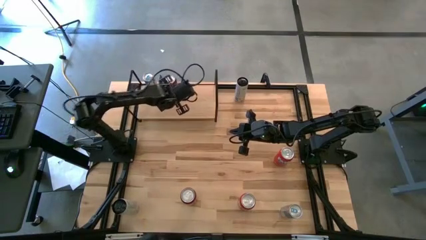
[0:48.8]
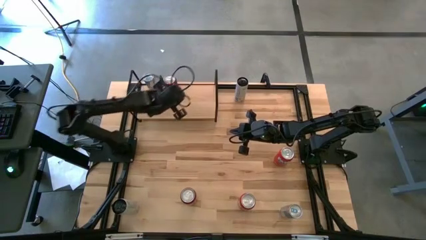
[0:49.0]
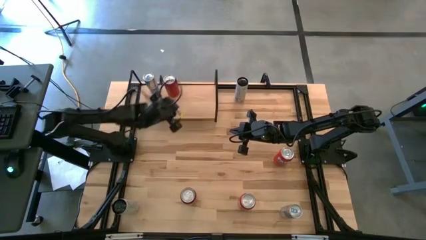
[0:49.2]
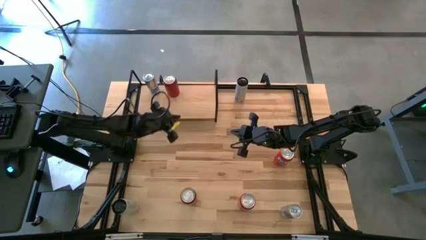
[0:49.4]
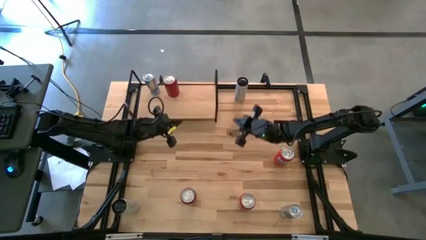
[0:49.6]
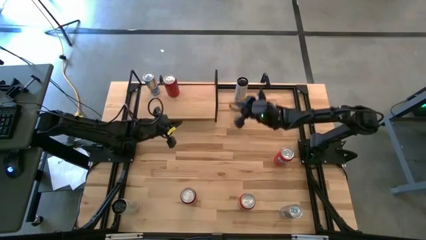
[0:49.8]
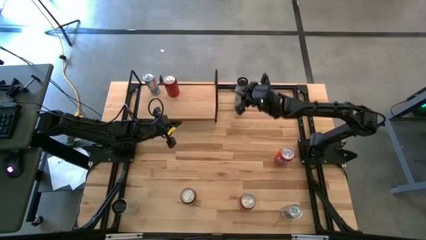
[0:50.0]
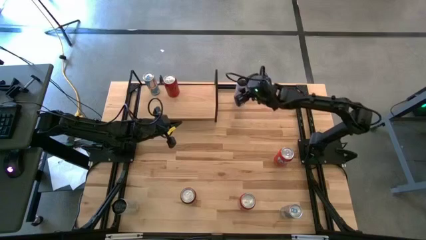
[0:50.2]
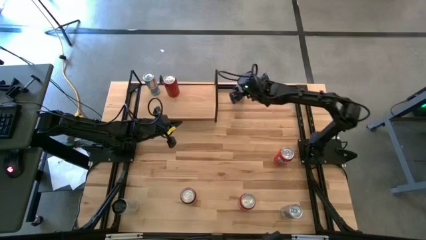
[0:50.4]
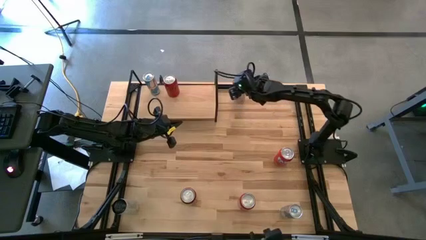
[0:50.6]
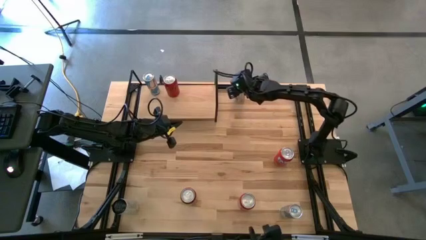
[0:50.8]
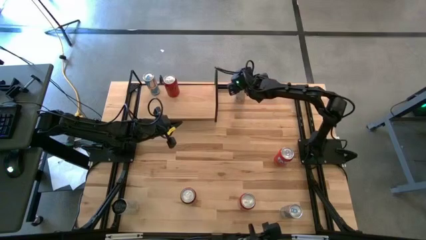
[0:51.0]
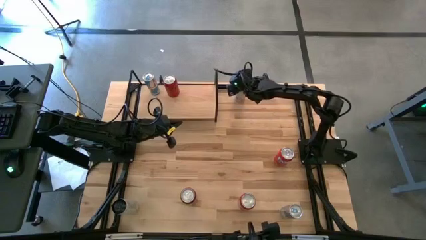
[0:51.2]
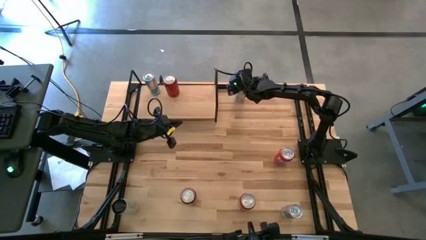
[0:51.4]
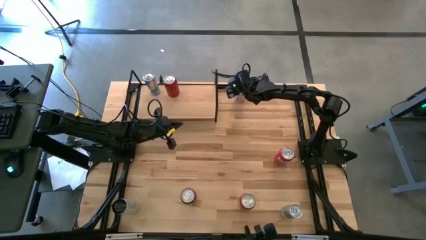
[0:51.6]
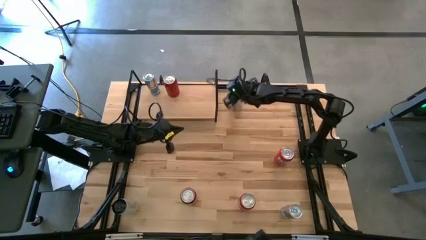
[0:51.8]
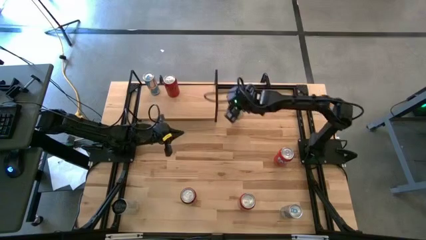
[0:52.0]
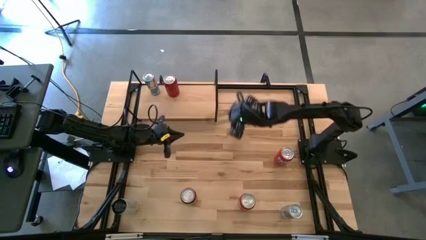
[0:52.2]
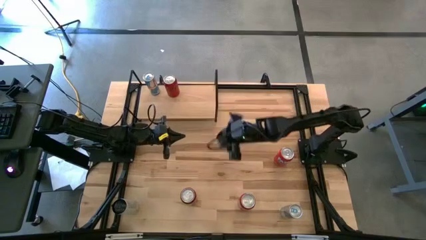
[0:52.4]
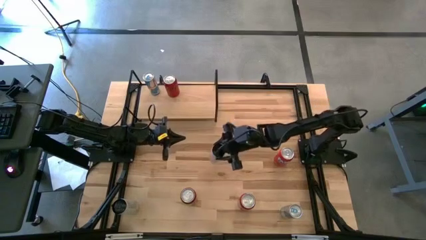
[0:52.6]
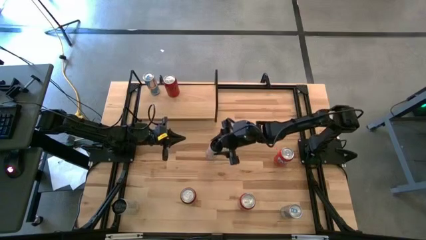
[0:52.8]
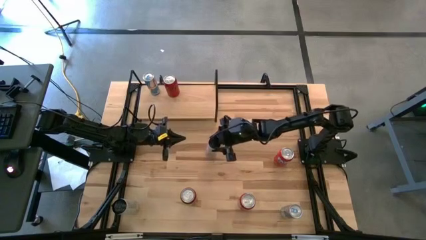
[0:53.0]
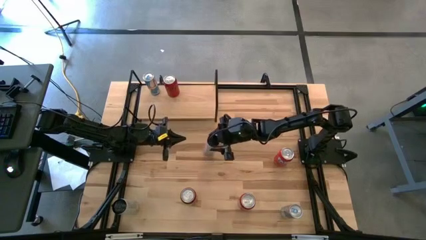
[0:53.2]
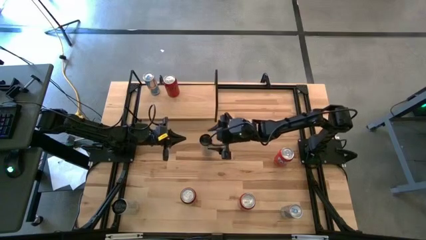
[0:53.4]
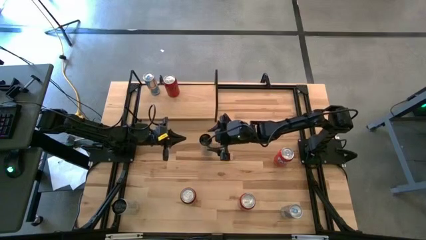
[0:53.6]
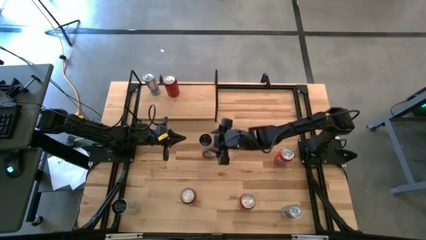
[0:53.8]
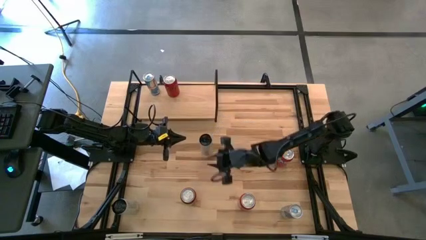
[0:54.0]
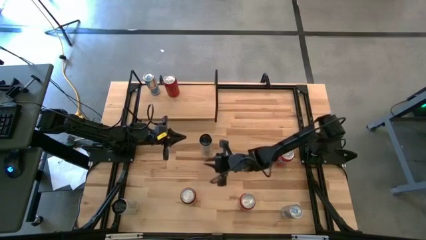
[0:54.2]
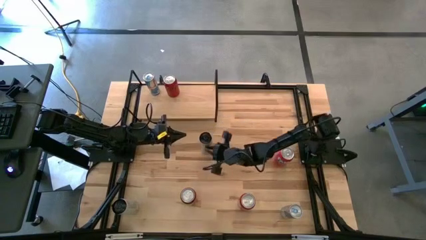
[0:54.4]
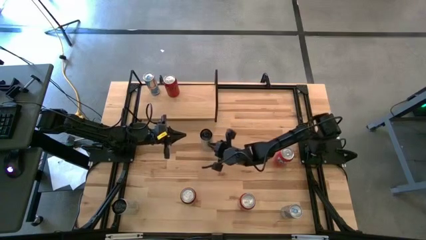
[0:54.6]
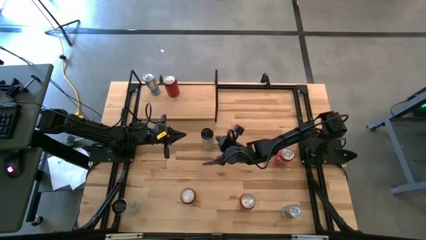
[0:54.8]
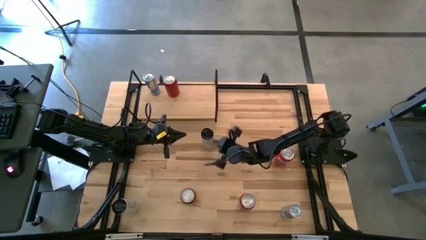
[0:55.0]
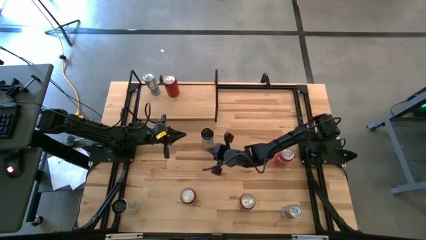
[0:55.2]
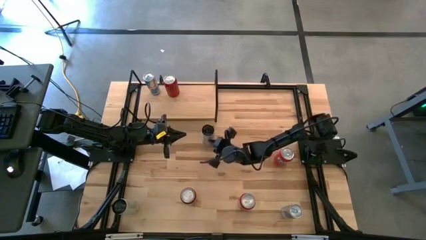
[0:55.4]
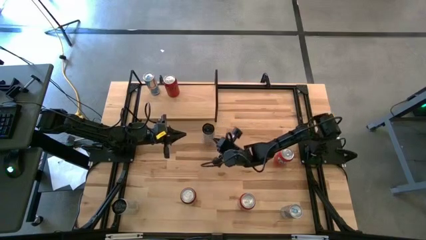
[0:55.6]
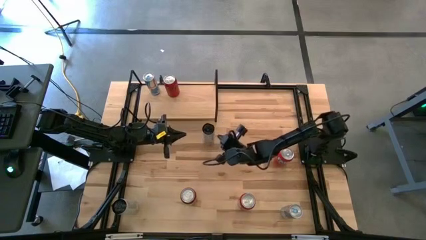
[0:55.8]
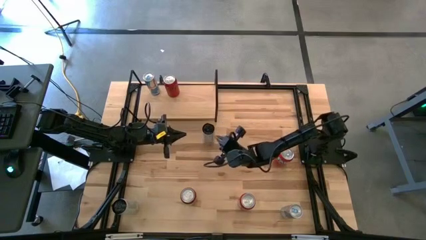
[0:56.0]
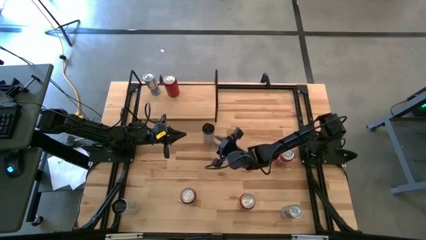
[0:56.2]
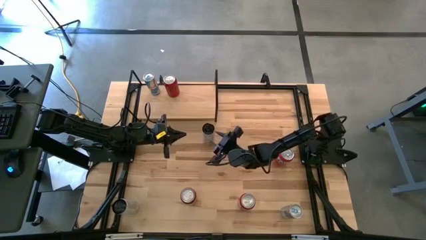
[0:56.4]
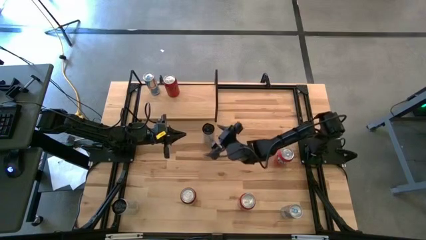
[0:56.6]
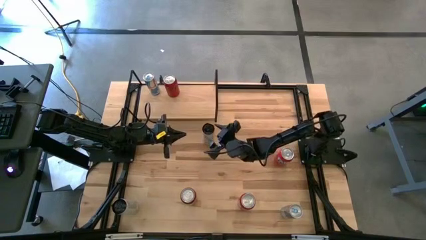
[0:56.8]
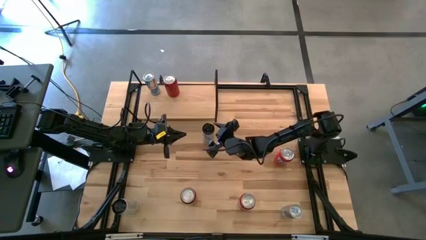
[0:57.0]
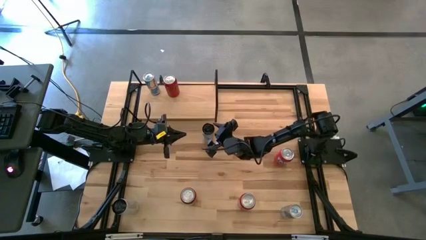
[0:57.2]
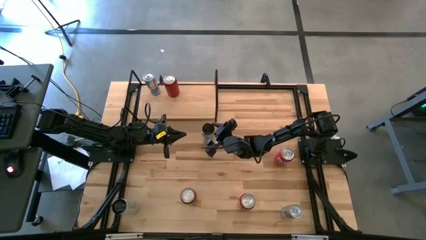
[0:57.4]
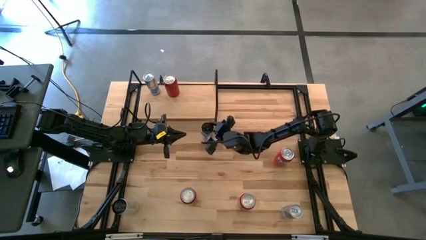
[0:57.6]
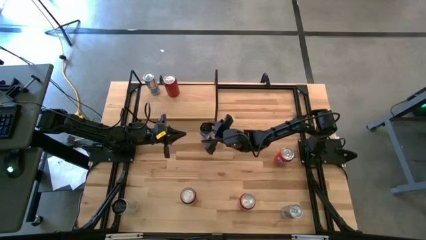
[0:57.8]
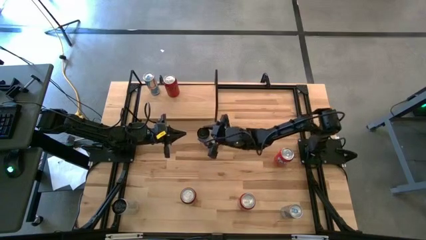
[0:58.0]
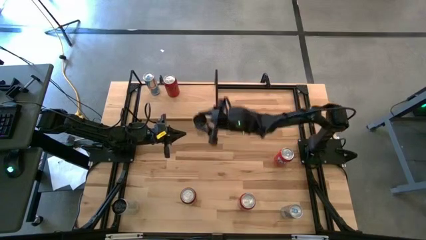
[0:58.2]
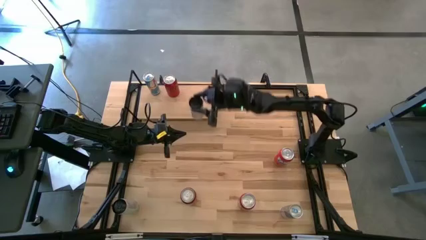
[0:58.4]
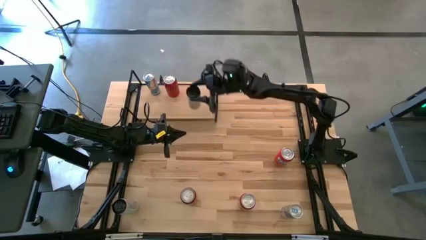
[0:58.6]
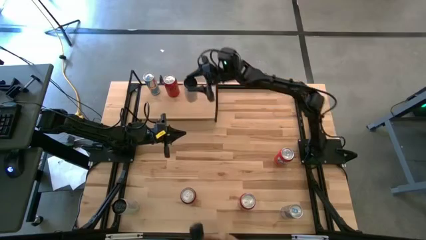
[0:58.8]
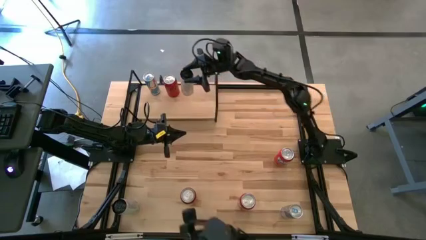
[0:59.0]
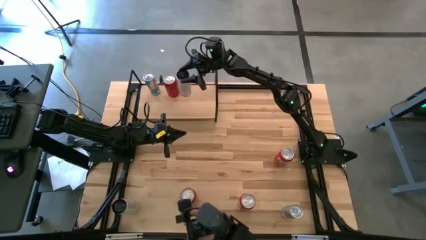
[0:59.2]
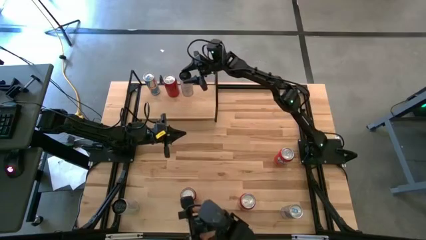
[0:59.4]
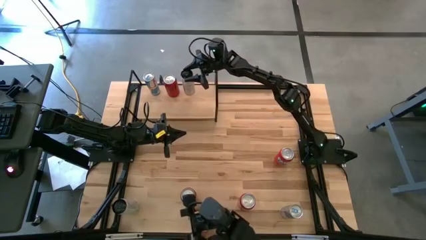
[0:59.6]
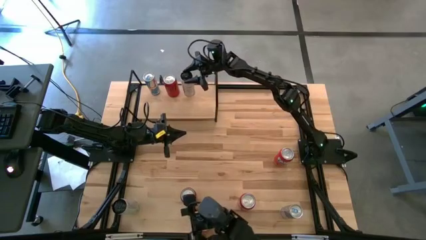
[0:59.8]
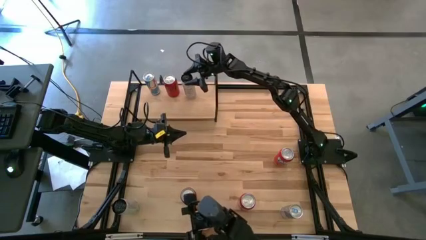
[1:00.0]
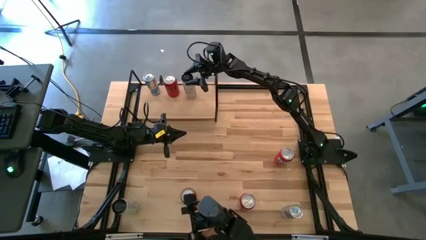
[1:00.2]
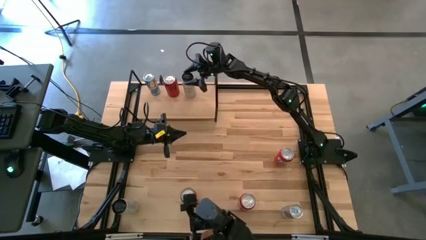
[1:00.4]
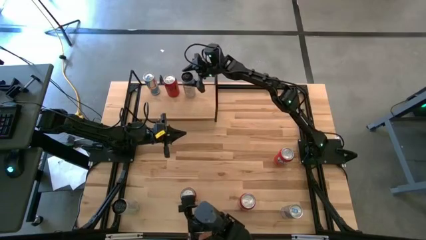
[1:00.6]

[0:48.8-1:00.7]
Task: Place canned beverage on shelf
Put the top white yellow soda can on the shelf
